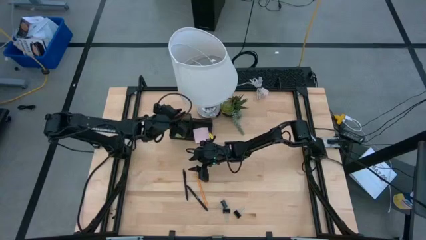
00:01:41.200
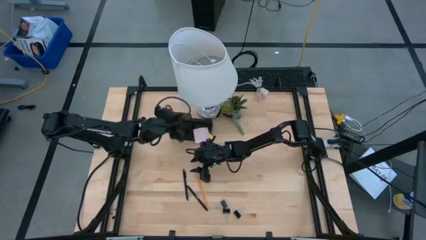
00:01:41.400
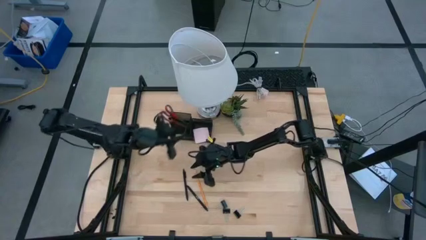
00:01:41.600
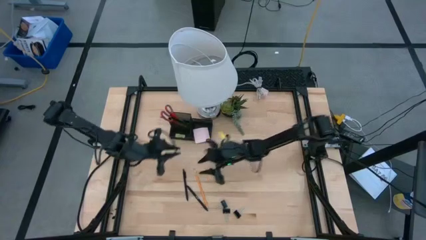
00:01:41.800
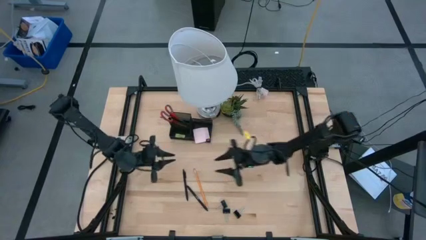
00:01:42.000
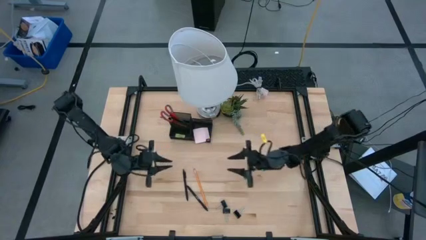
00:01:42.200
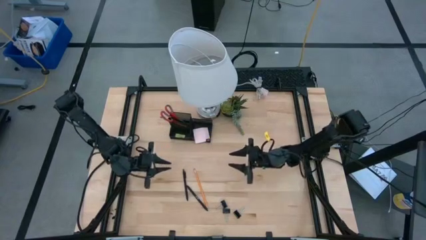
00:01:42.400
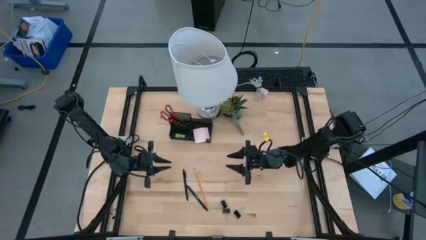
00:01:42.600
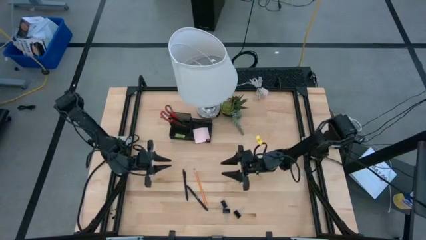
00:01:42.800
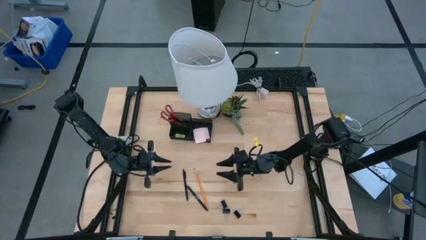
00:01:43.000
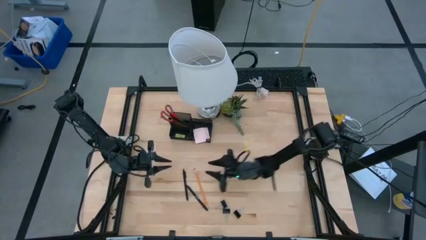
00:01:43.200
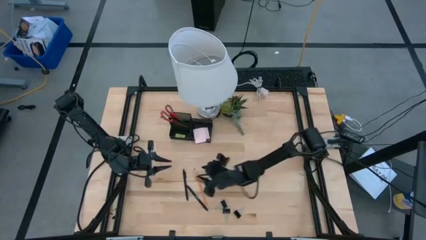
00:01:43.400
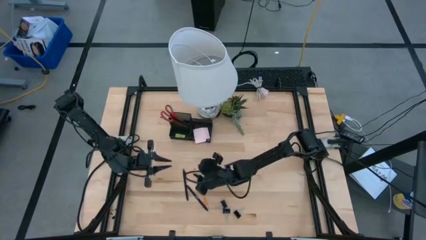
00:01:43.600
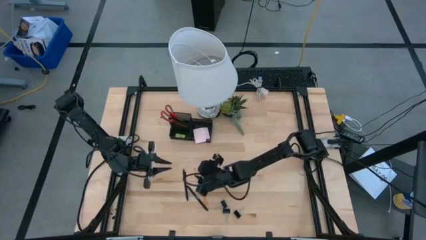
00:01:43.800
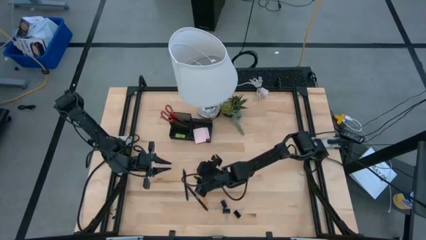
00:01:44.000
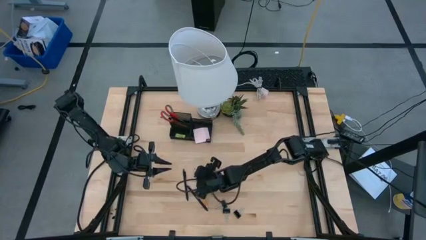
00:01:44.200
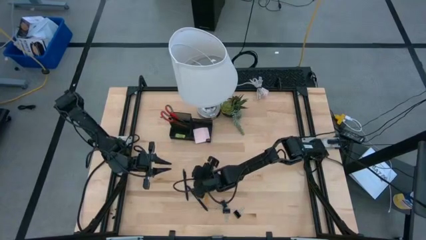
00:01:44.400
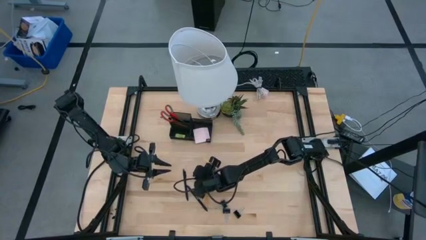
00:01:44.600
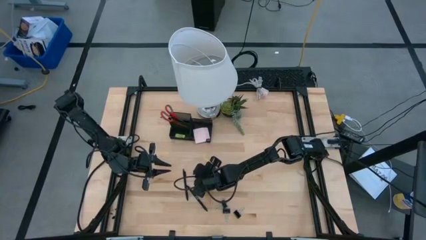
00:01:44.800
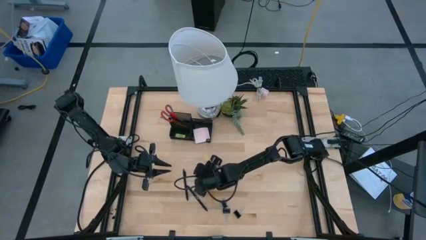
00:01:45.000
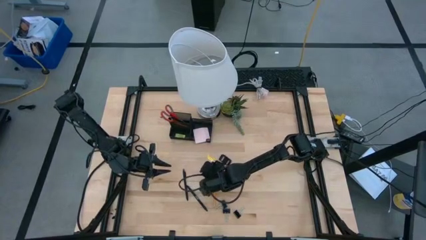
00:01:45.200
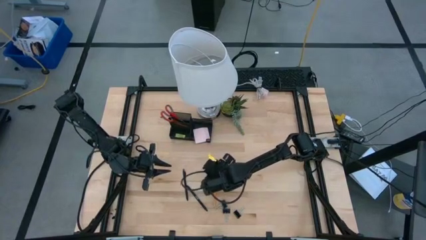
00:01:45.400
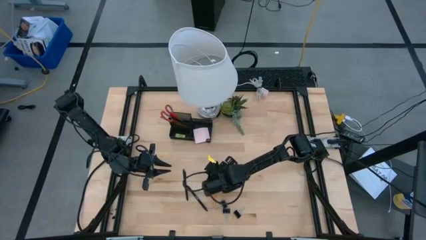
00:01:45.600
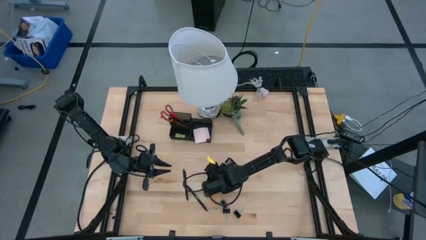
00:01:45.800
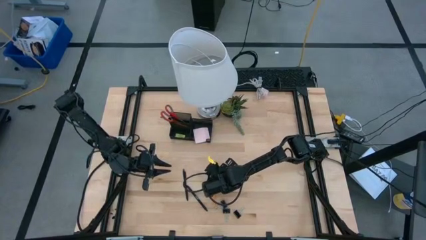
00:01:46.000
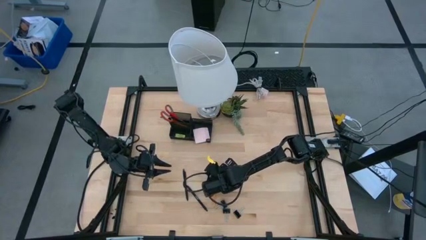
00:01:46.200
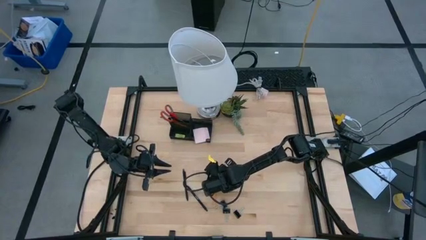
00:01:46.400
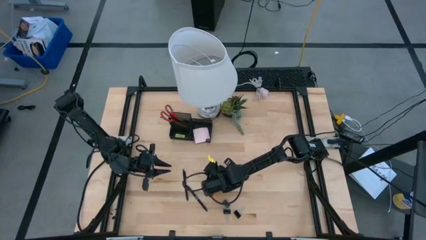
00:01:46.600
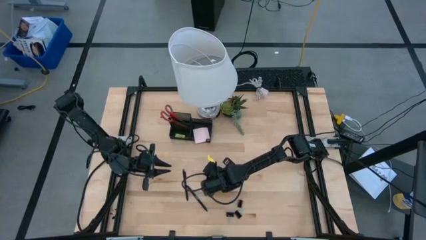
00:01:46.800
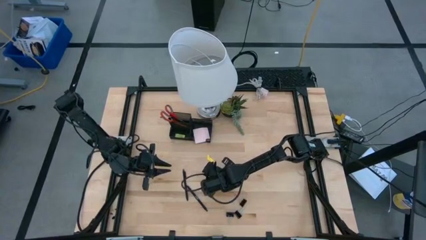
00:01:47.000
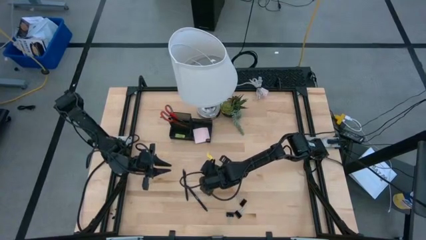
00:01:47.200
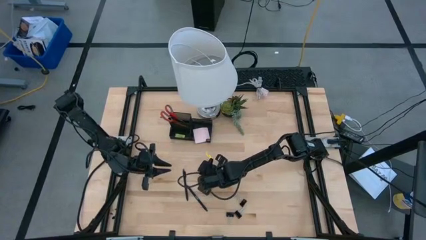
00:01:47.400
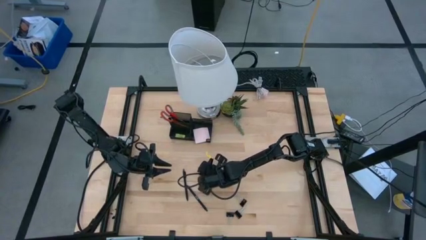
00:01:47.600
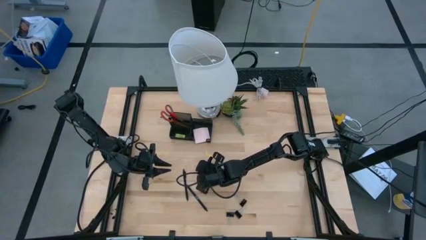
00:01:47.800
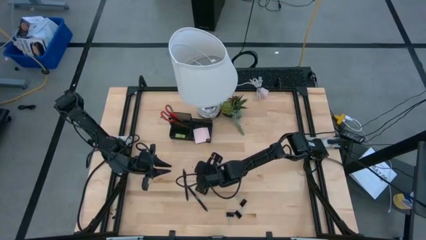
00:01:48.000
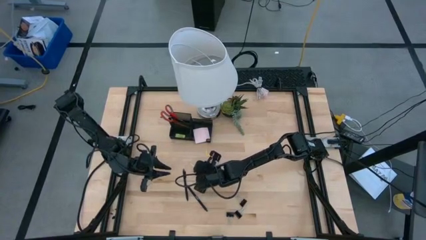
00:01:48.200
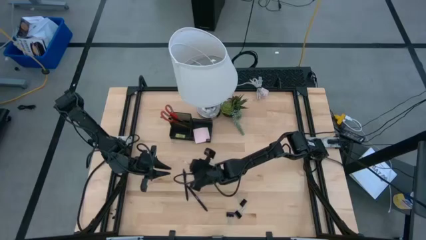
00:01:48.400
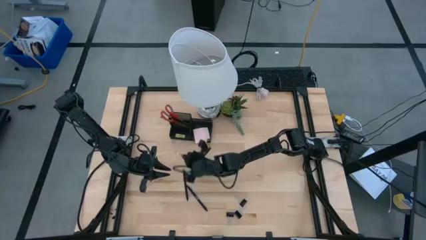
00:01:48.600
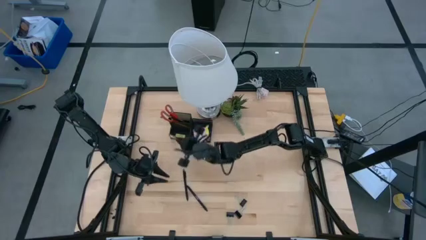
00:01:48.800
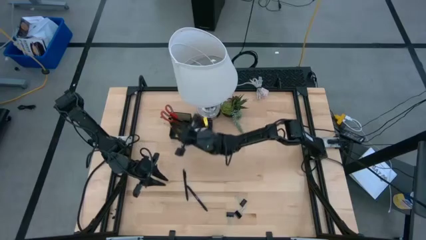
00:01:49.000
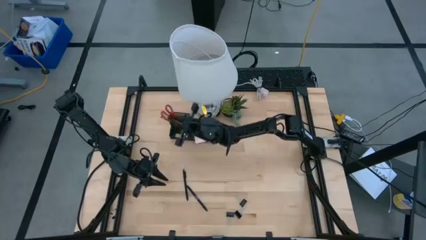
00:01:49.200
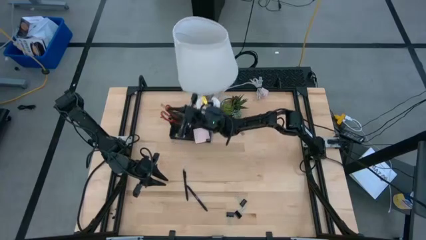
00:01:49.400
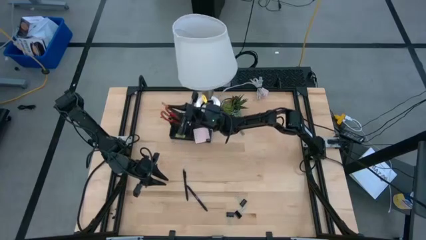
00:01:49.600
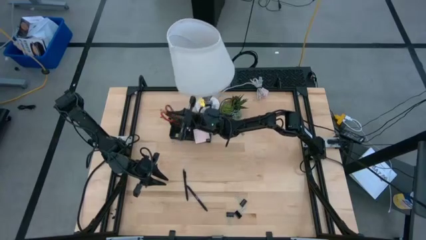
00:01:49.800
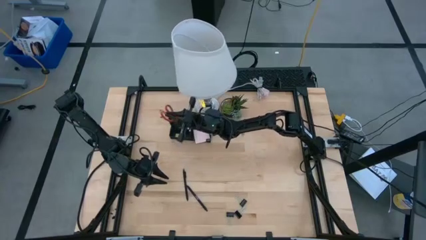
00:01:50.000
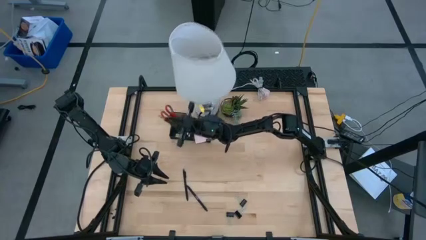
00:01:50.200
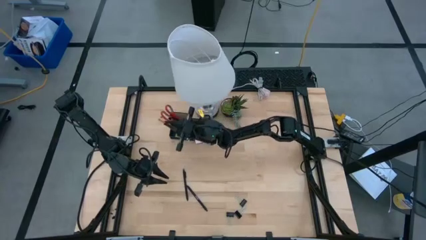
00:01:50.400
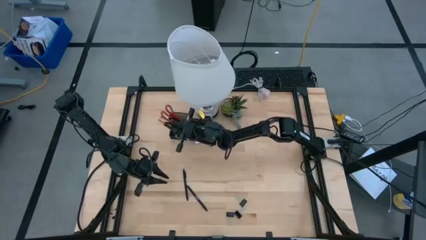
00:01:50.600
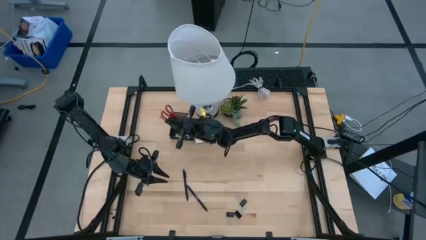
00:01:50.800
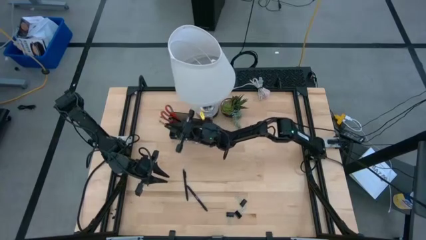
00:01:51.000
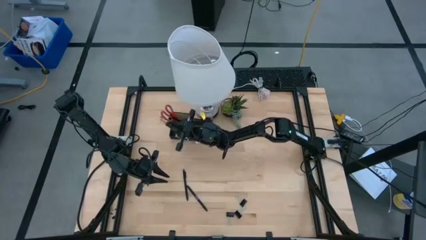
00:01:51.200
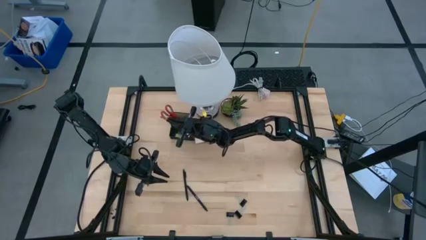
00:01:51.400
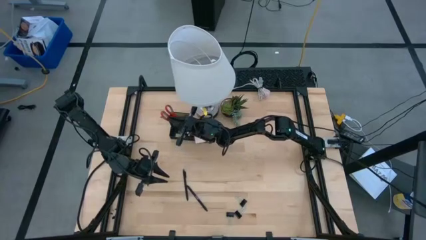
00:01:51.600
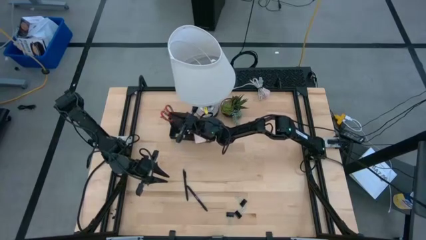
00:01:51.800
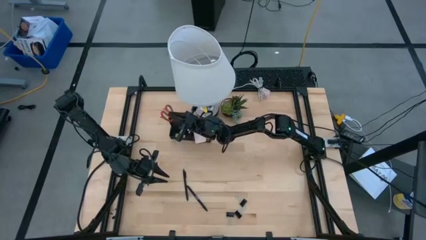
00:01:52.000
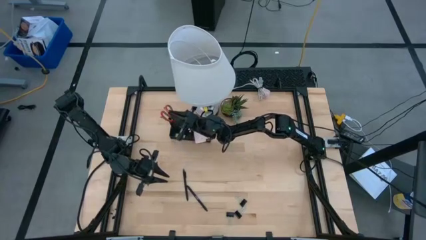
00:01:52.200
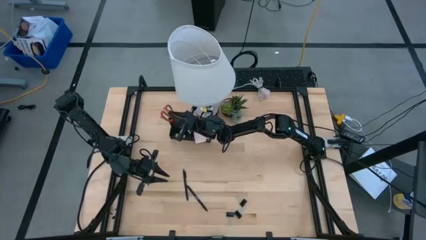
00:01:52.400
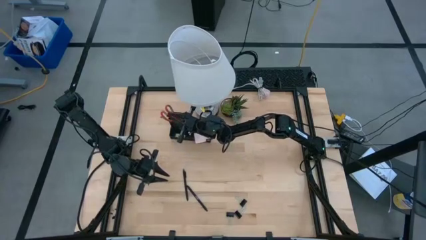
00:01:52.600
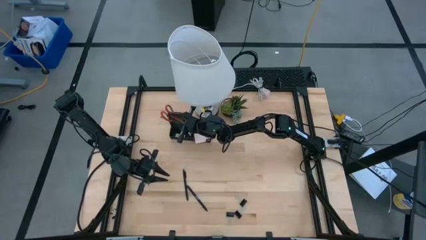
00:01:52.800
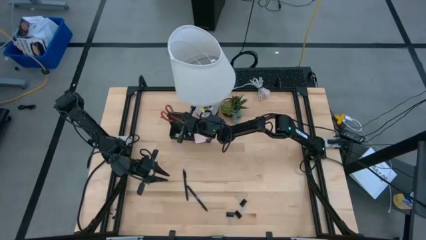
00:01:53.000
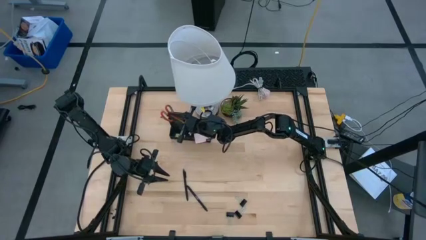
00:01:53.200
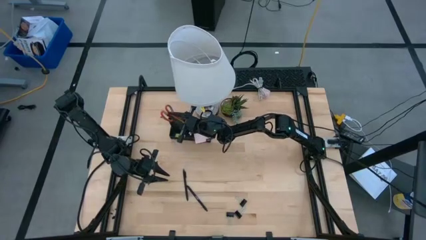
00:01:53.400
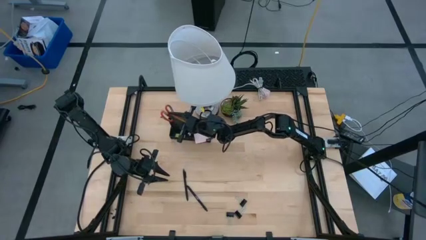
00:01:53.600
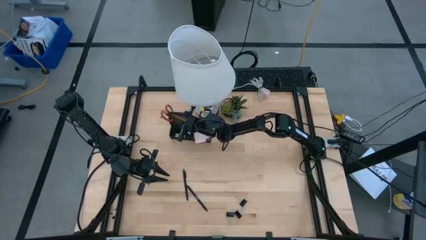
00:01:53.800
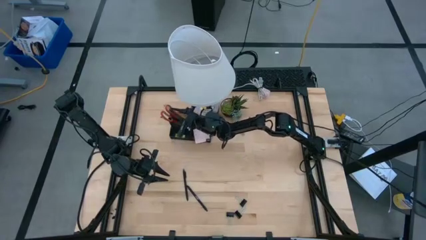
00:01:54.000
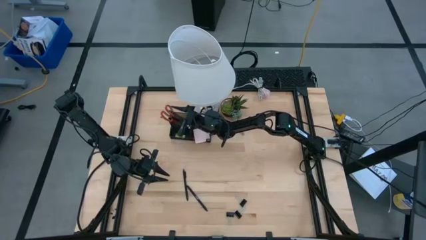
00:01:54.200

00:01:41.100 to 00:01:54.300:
Task: Pick and place office supplies into organizer
Put the orange pencil into the black desk organizer

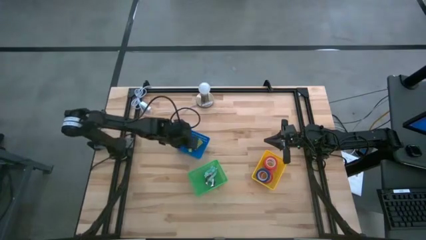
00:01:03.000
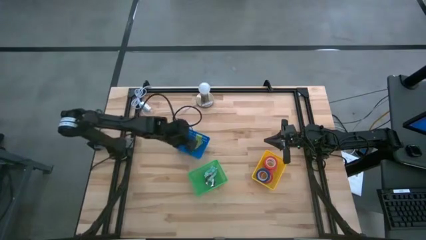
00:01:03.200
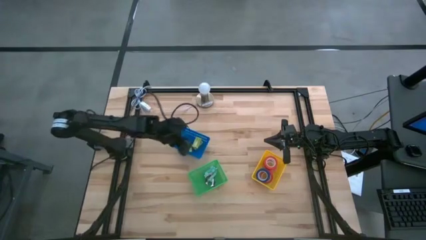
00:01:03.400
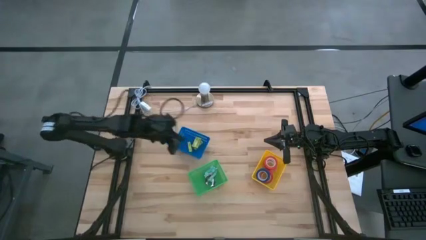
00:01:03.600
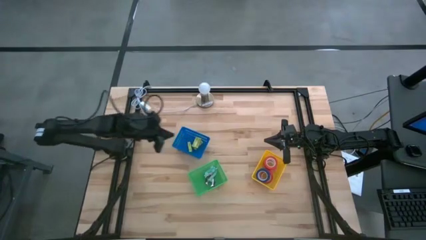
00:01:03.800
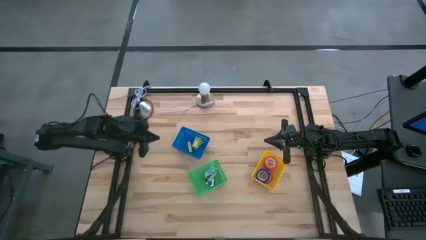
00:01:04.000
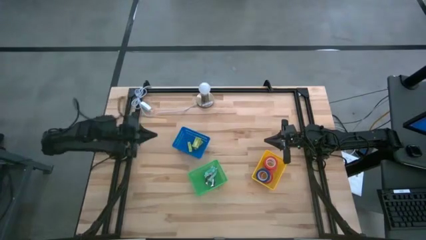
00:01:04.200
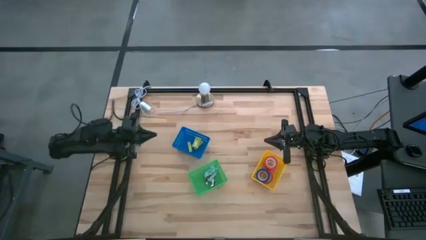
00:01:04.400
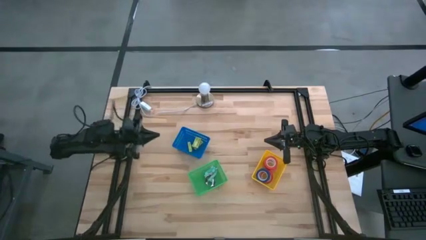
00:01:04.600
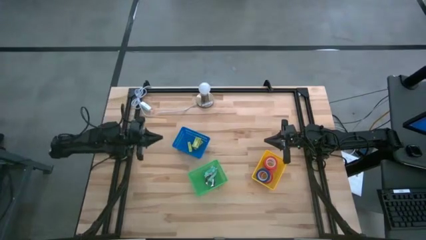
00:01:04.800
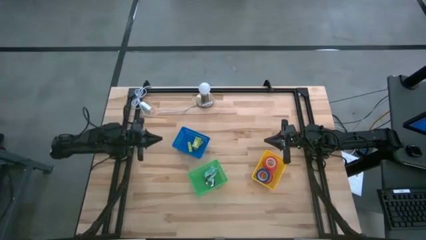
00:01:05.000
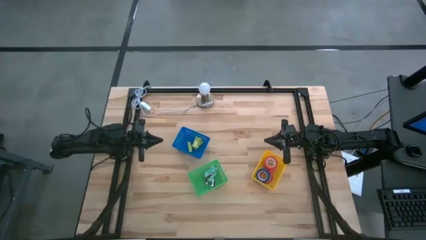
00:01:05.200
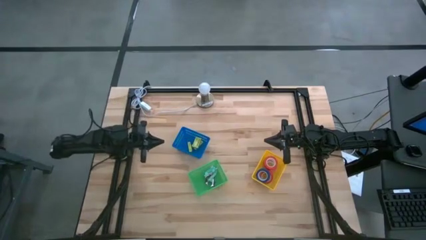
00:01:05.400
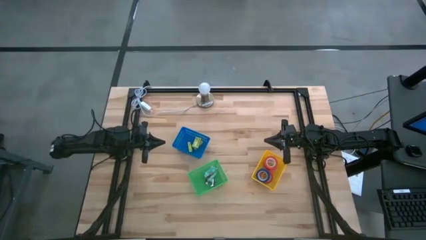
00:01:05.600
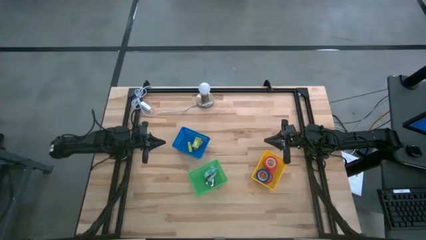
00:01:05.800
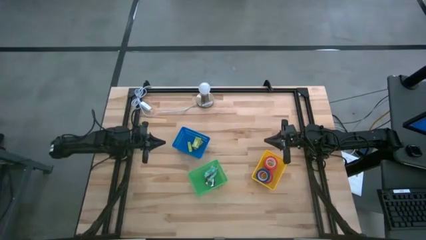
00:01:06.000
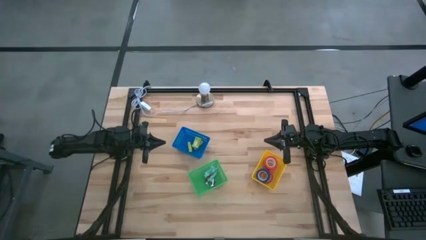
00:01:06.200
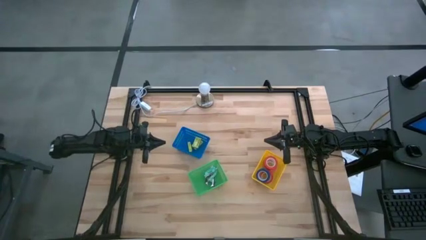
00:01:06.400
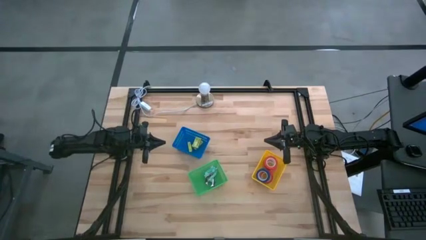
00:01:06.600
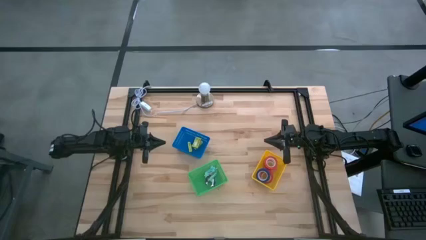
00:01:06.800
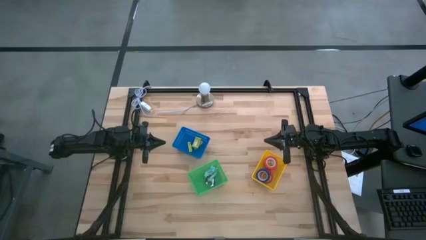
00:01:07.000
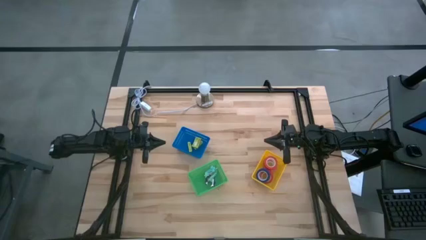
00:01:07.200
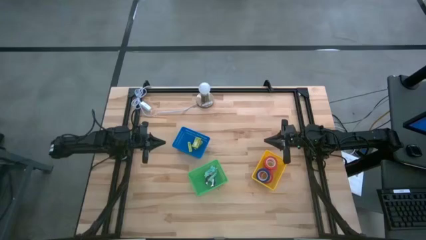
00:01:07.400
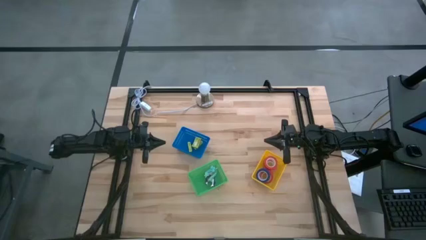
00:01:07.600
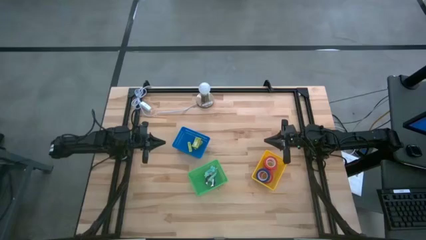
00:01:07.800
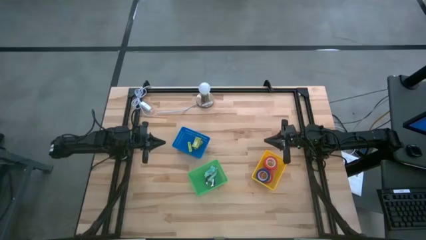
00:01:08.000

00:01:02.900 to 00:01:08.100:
Task: Pick and place Stapler, Stapler remover, tape
Return to Home Position
